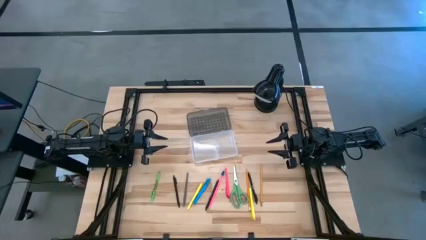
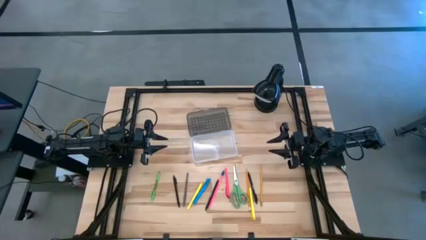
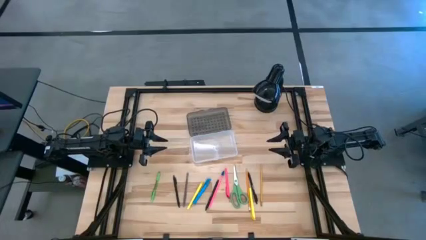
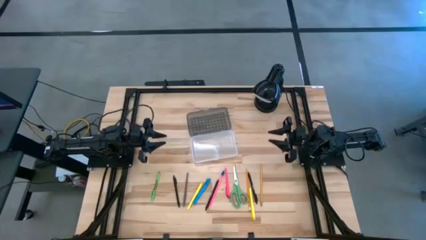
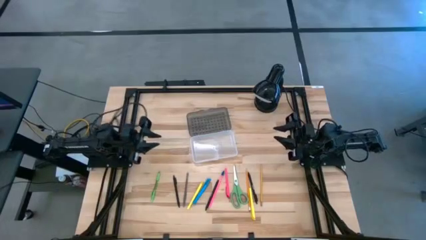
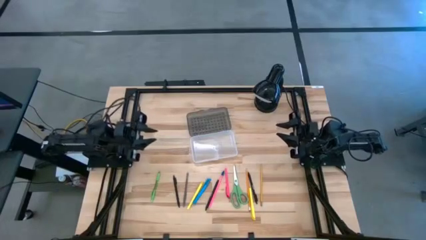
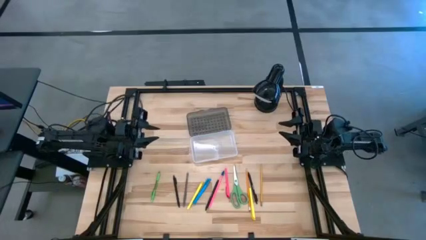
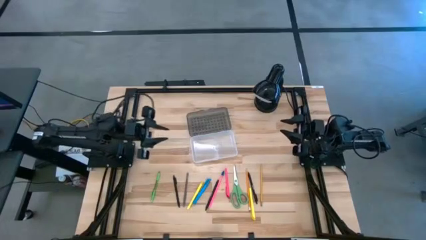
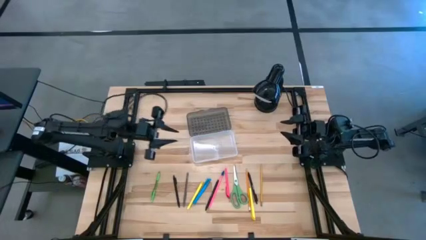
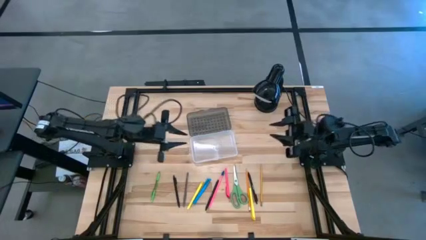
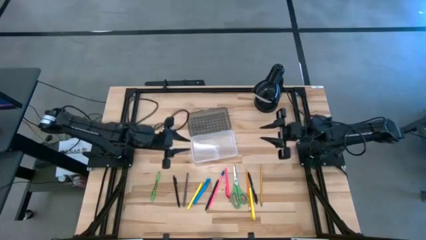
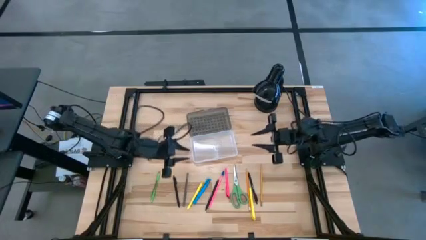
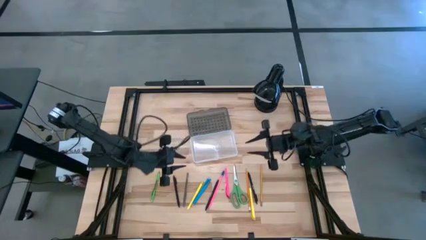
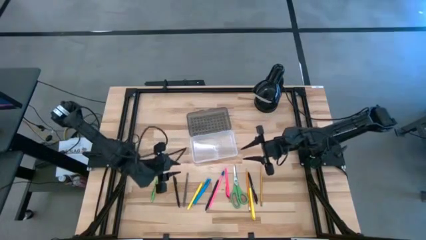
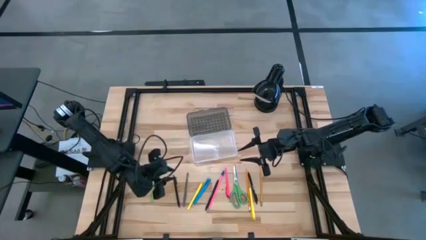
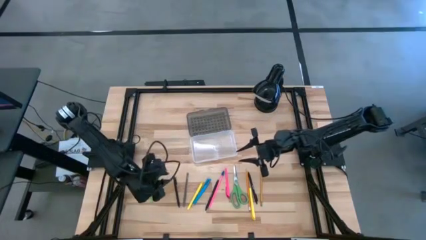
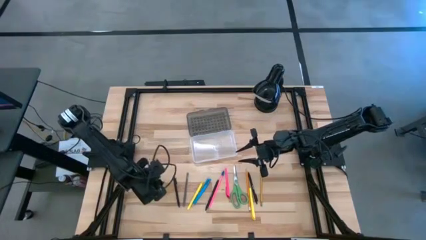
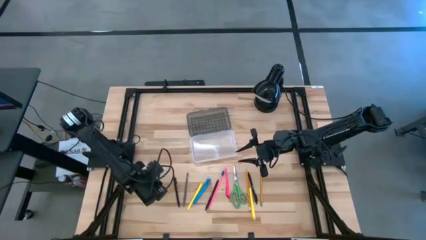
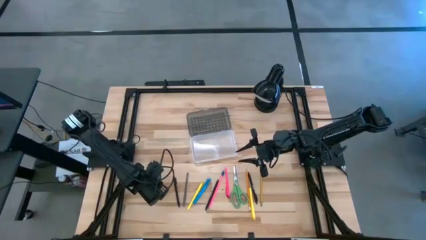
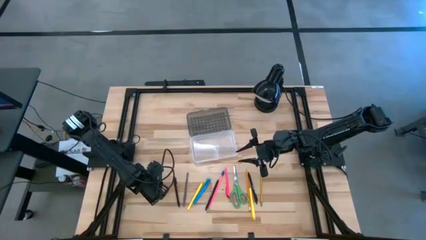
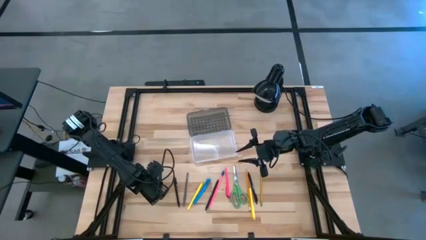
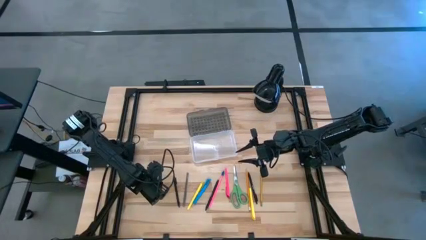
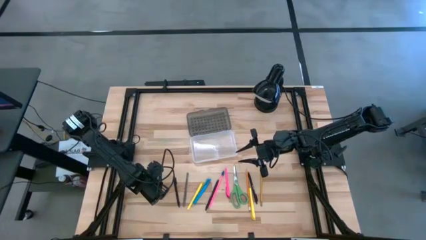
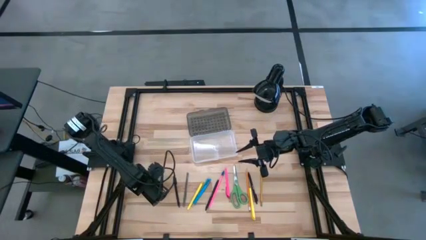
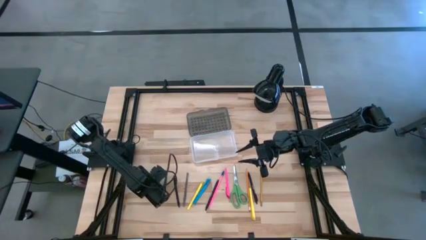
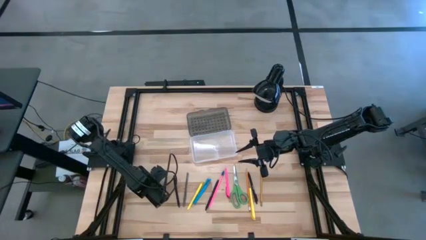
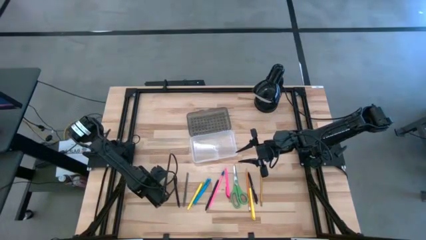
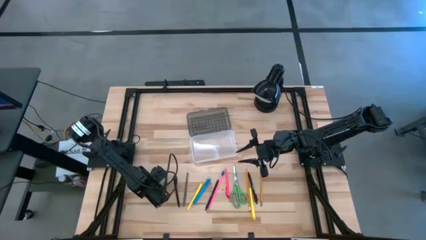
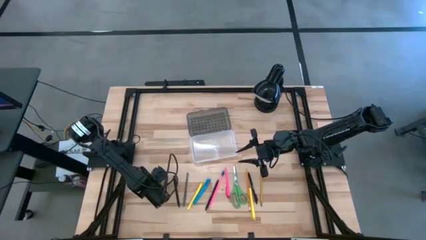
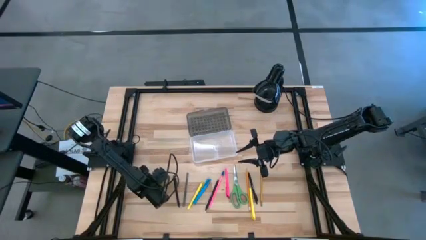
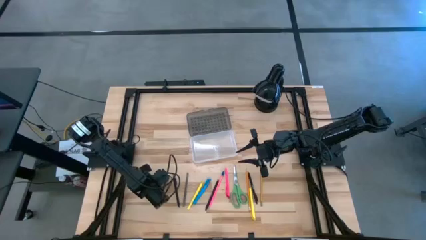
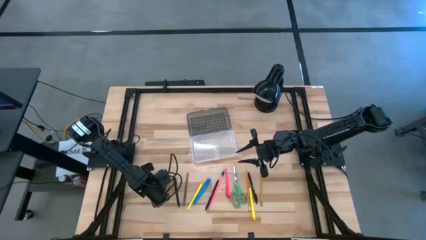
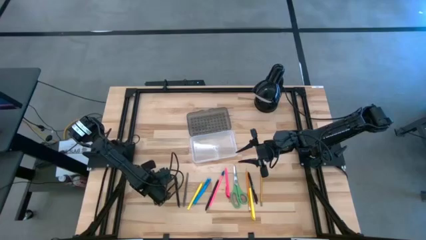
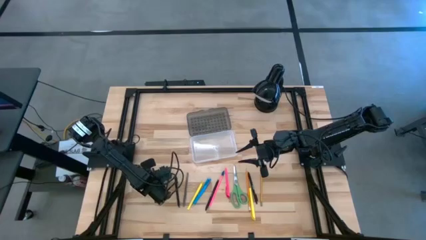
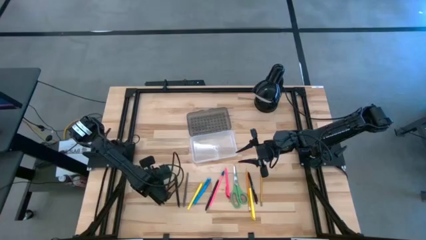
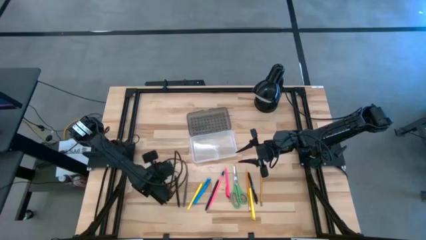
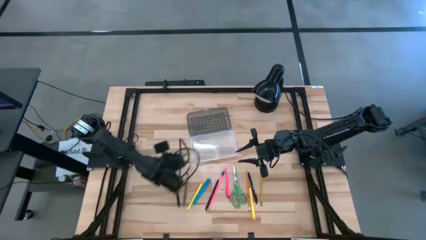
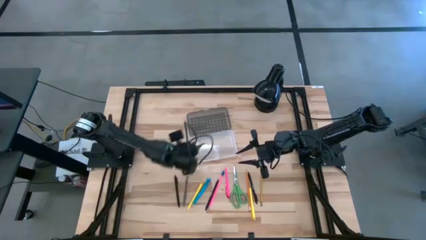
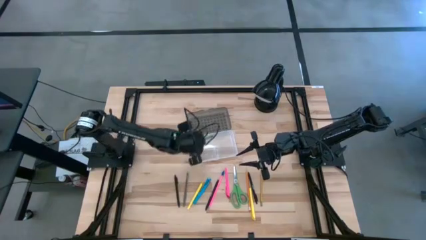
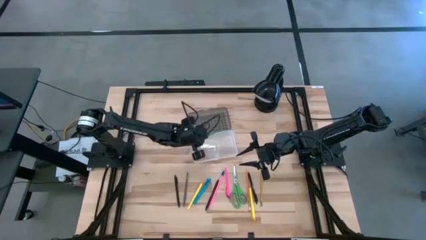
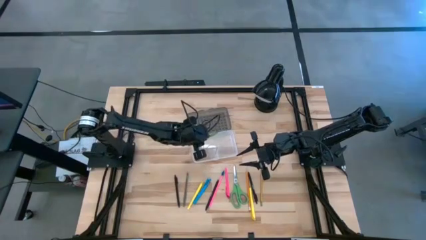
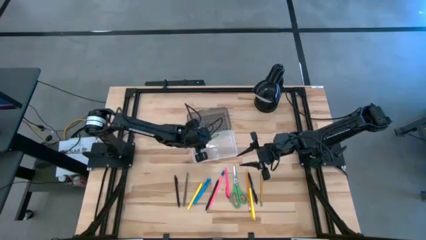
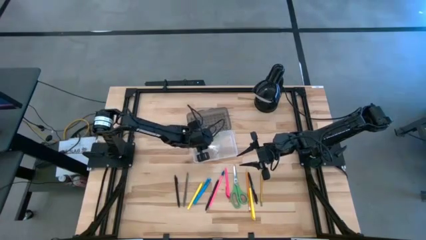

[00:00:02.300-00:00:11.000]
Task: Pick & place school supplies into a supply box
Put the green pen into the transparent supply box

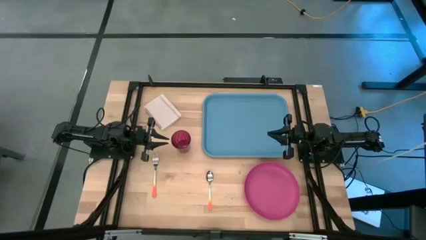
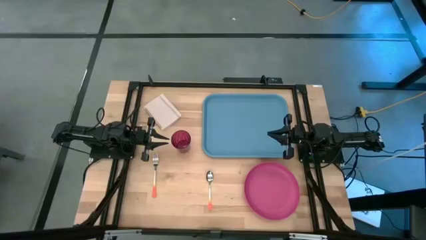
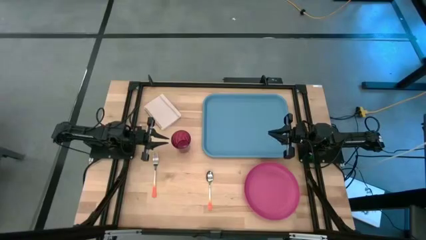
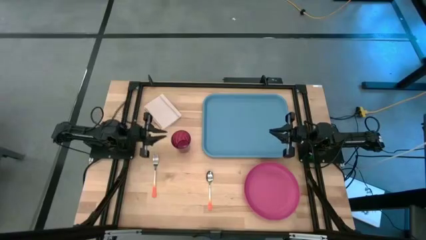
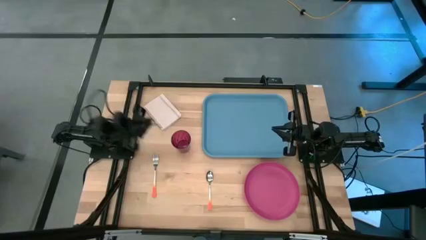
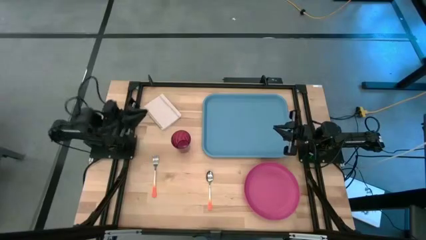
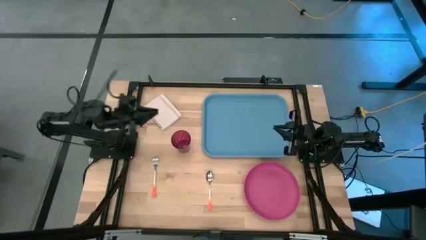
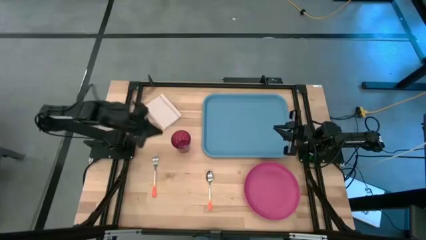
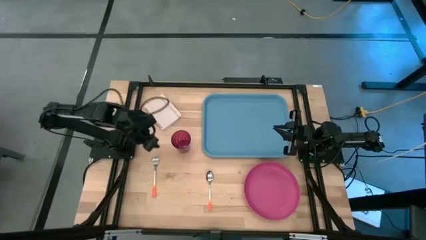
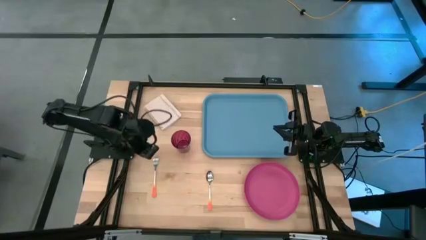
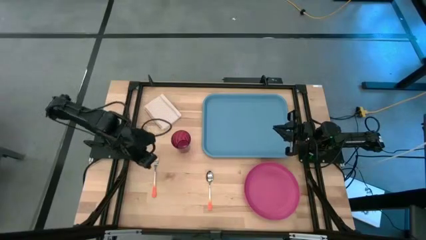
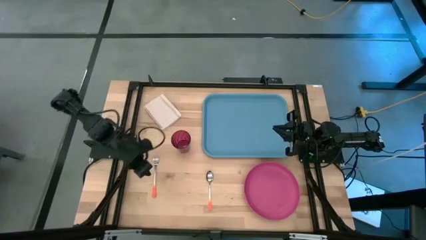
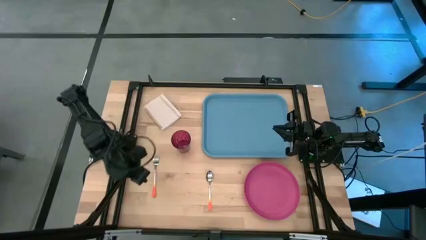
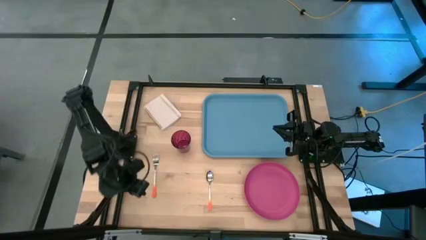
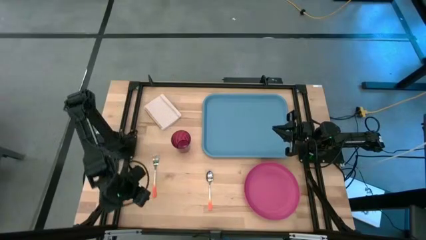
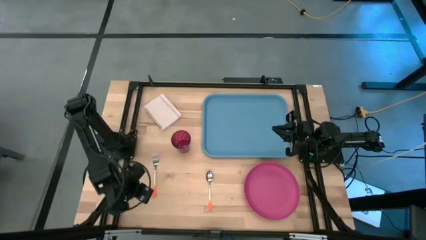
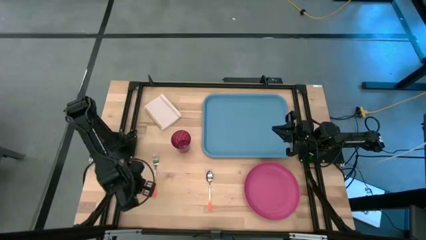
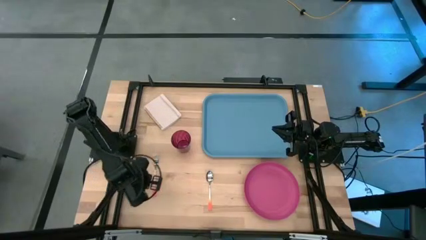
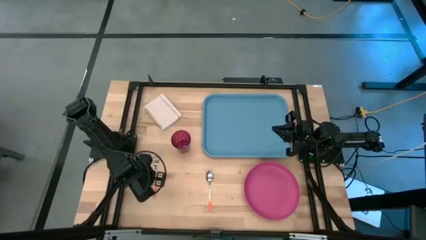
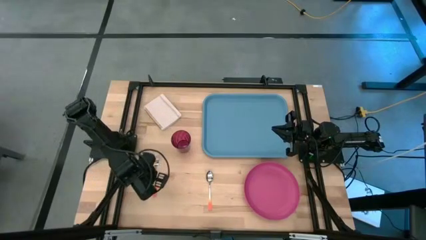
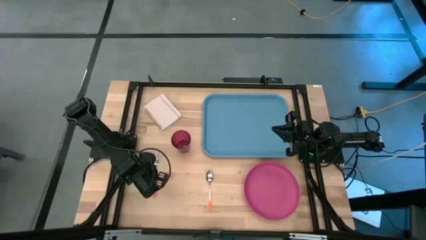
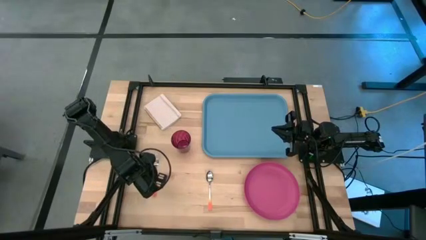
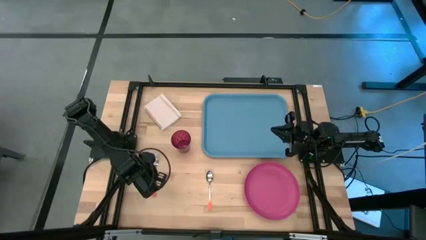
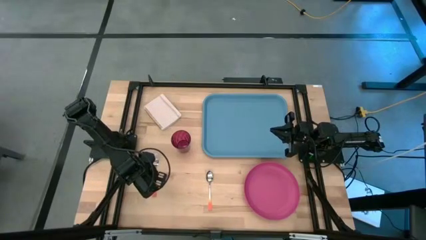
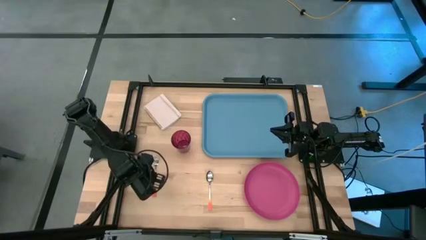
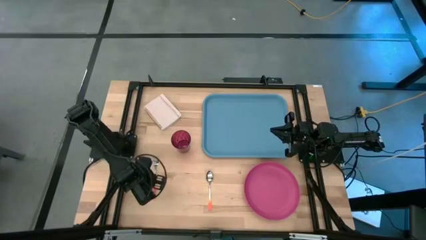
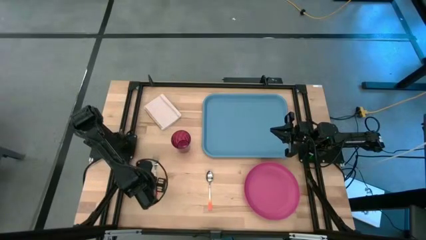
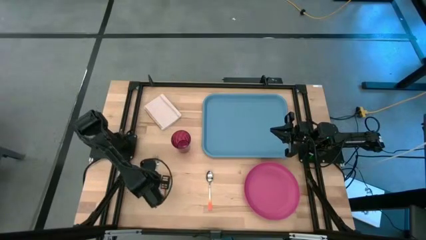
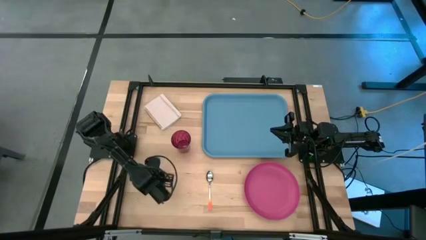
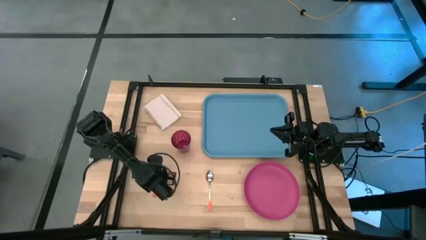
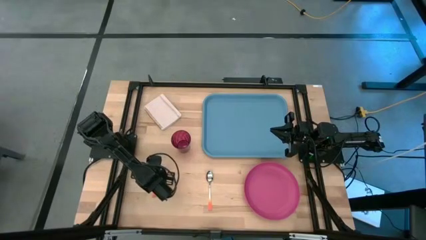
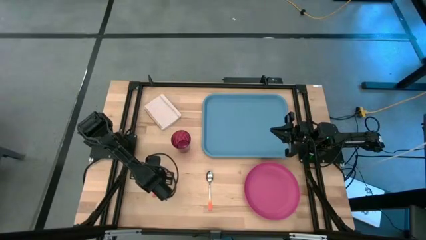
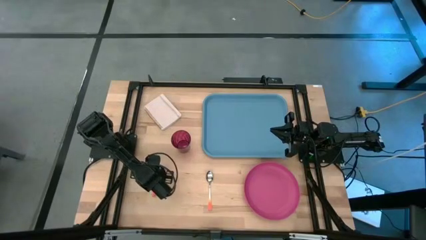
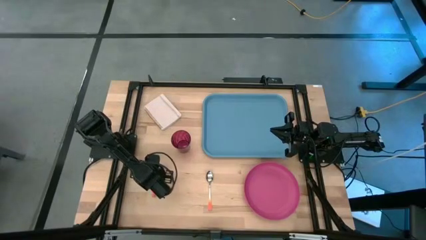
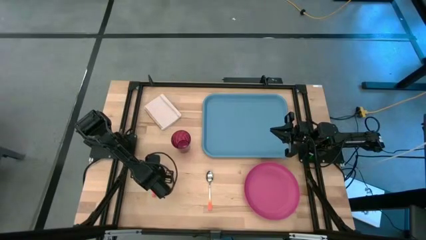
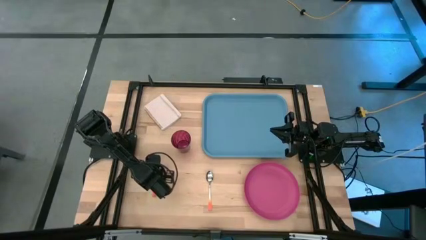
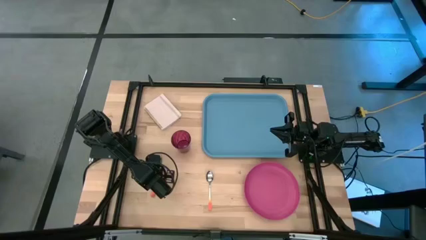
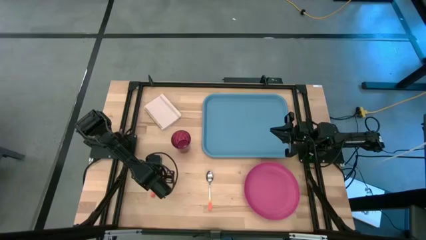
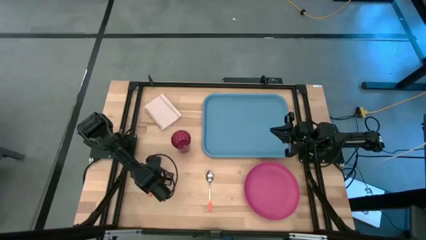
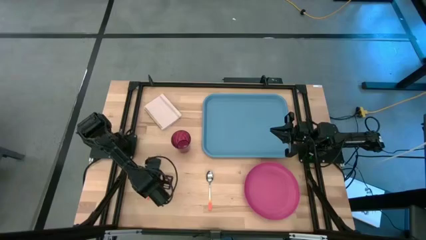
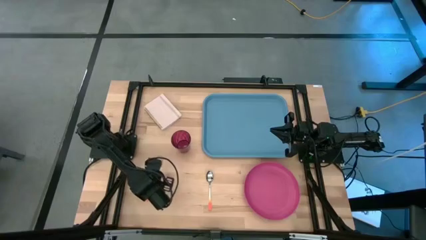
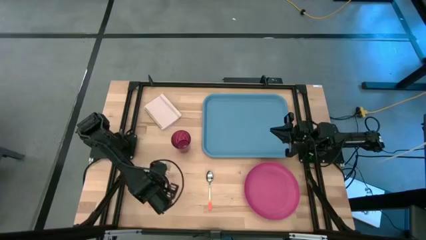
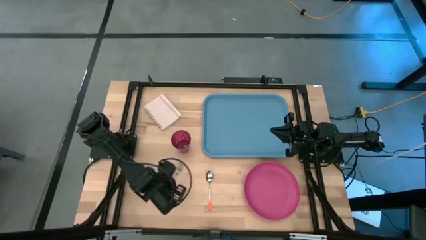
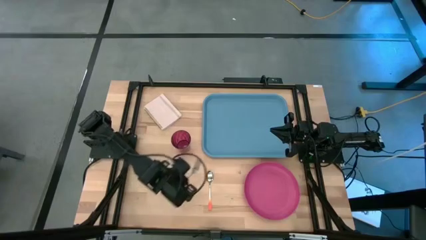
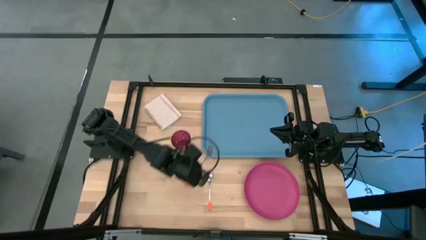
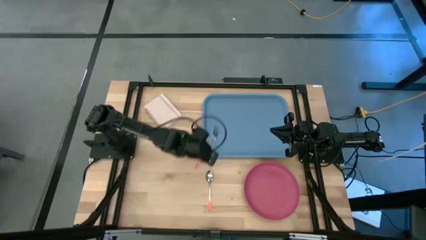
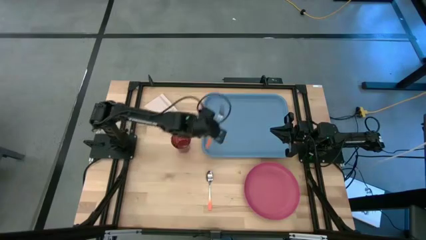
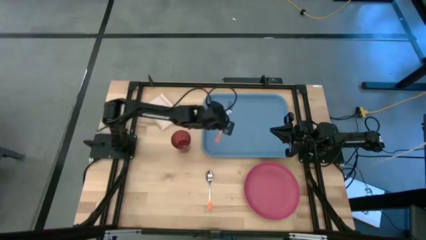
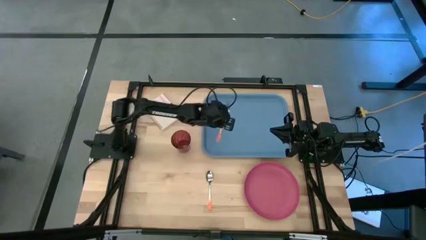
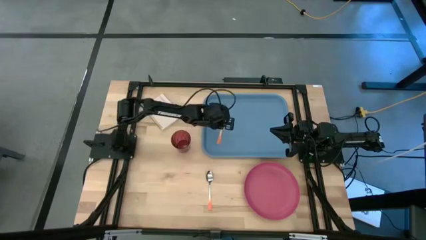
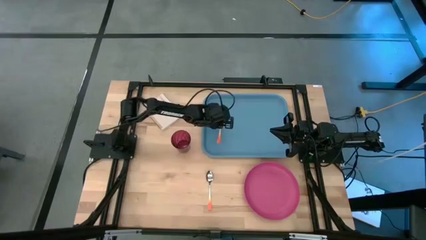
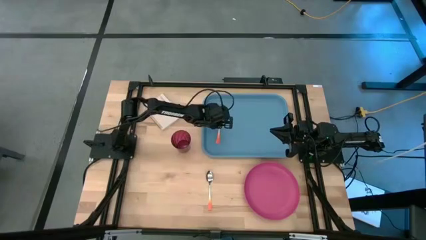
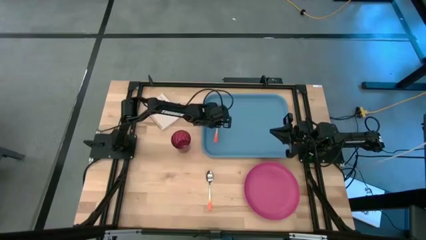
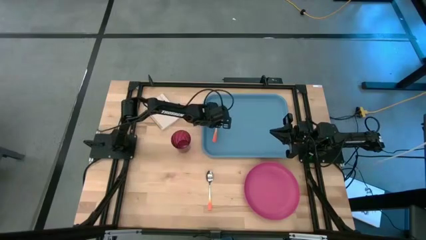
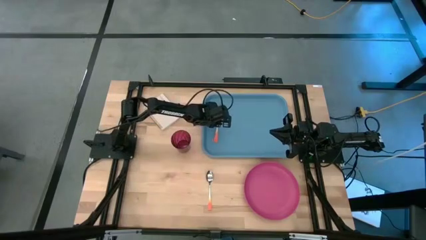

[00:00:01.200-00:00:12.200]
Task: Pick and place plate/cup/fork/spoon on tray
Put the orange fork on the blue tray
